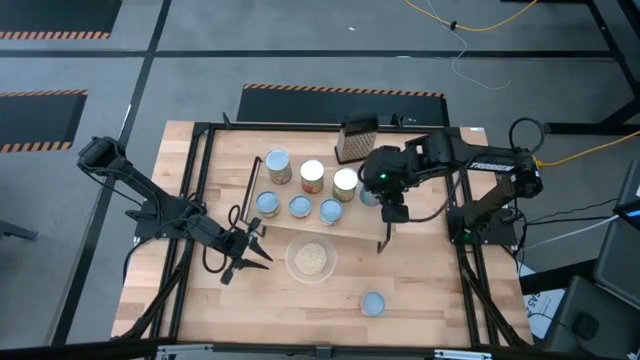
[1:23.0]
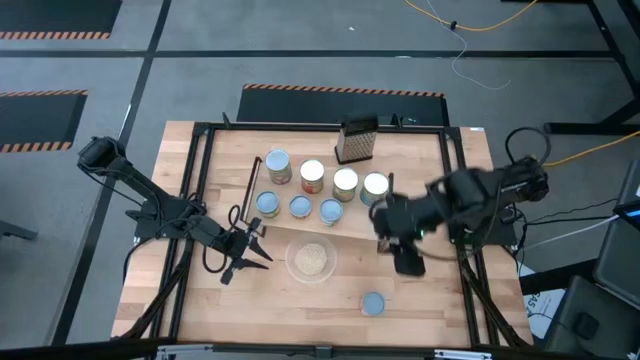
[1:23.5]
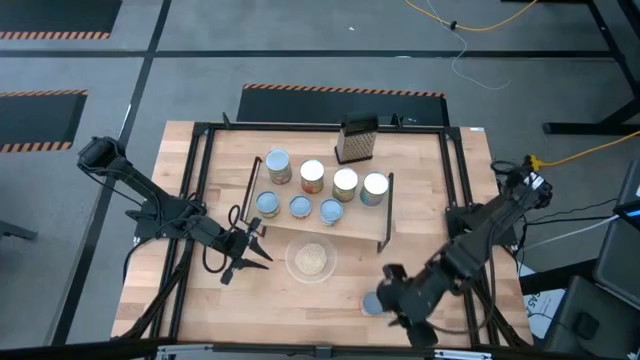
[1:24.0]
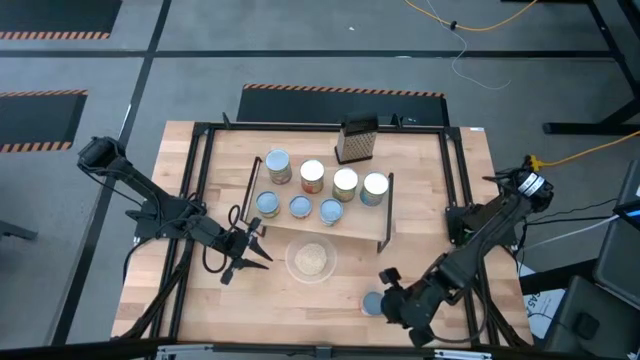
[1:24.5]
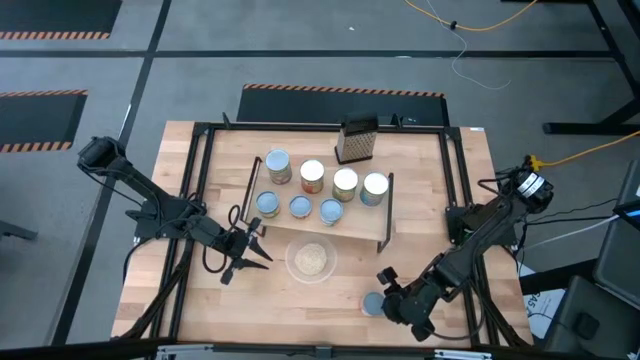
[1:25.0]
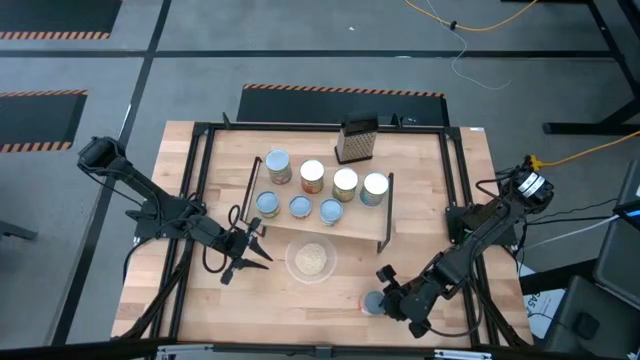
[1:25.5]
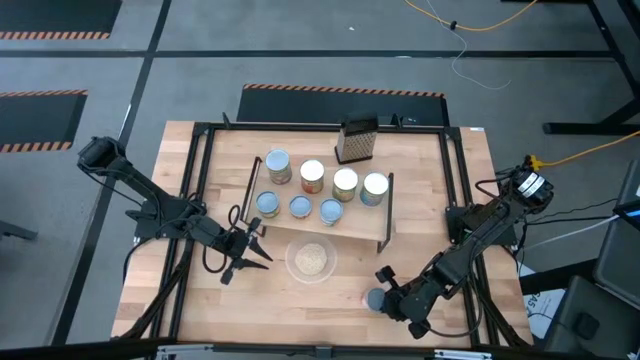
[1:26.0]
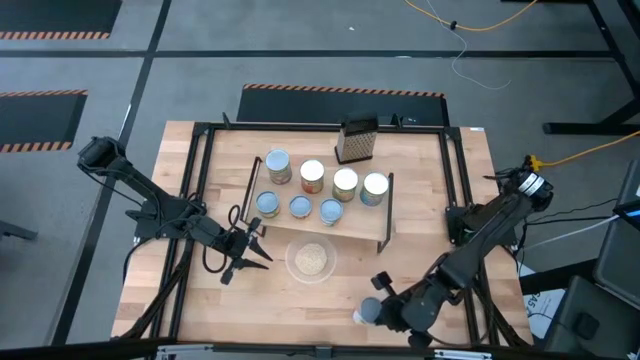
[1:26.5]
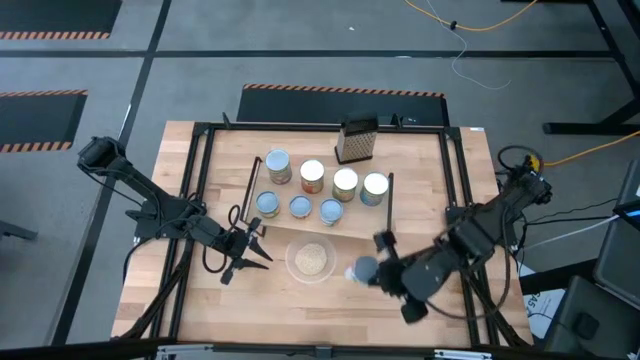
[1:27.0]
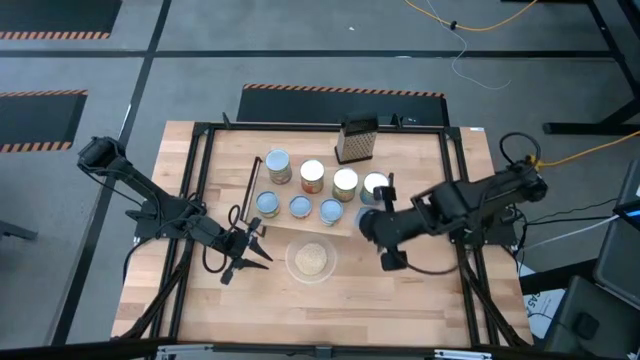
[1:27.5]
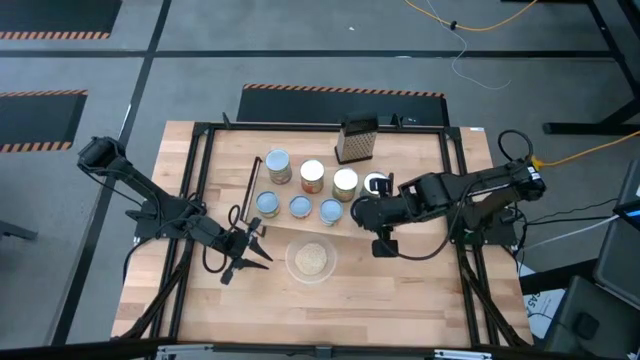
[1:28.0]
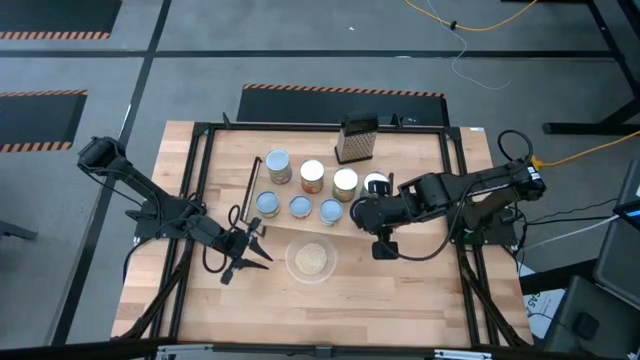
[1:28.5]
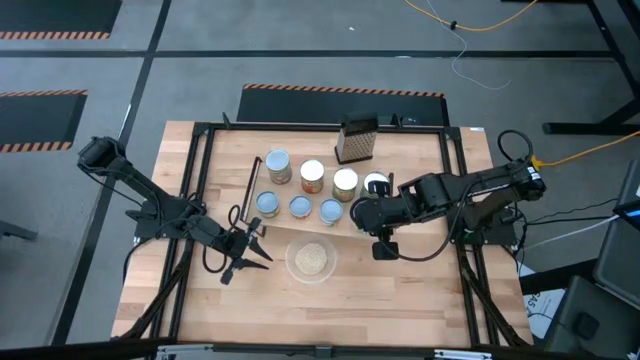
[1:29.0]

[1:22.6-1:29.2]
Task: Pick and place cans onto a shelf
Put the canned fruits on the shelf

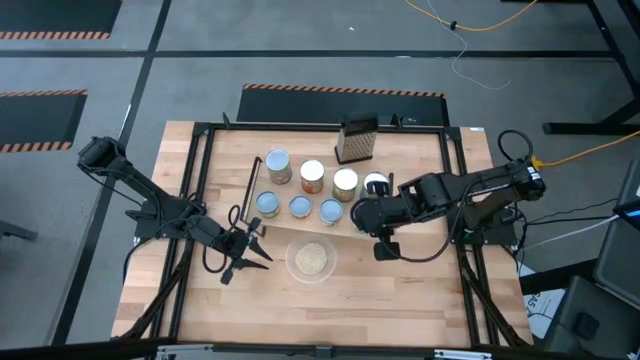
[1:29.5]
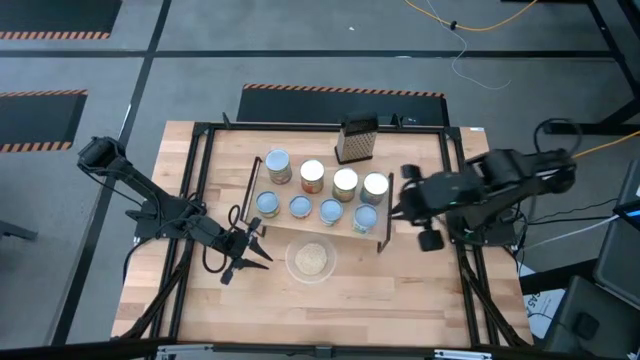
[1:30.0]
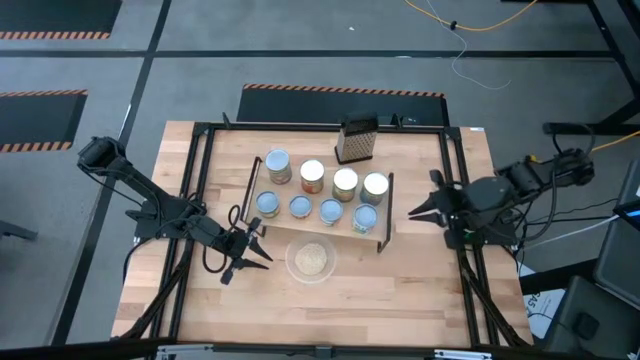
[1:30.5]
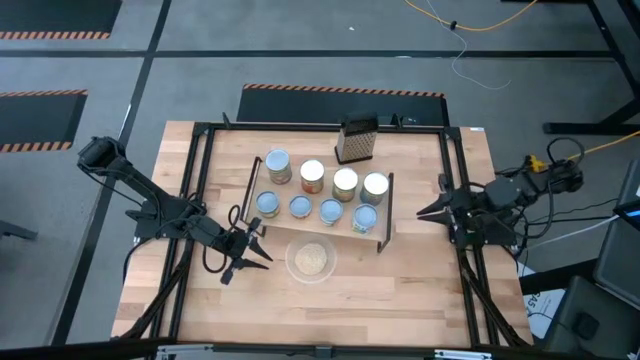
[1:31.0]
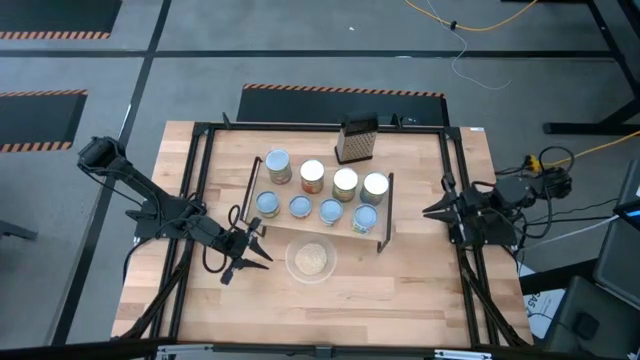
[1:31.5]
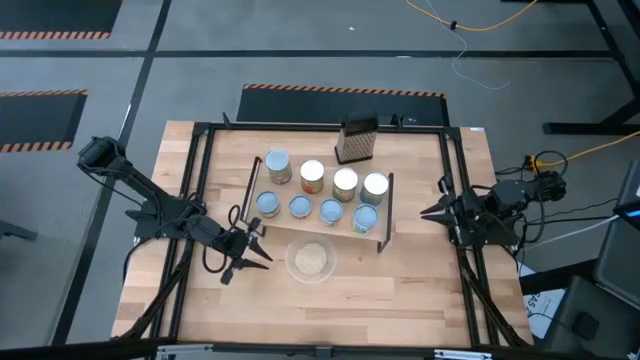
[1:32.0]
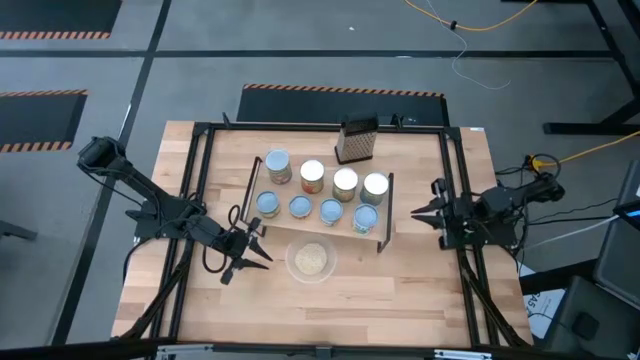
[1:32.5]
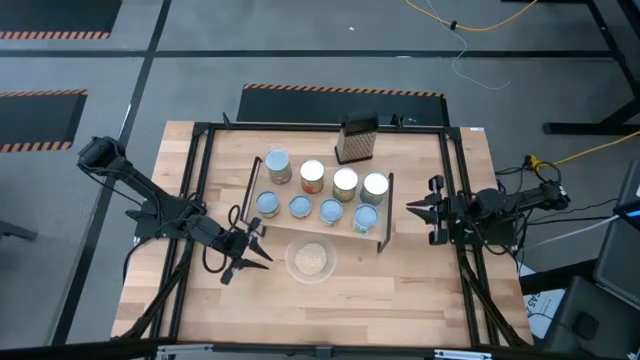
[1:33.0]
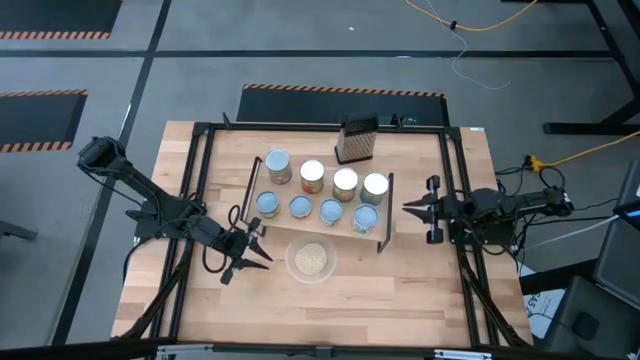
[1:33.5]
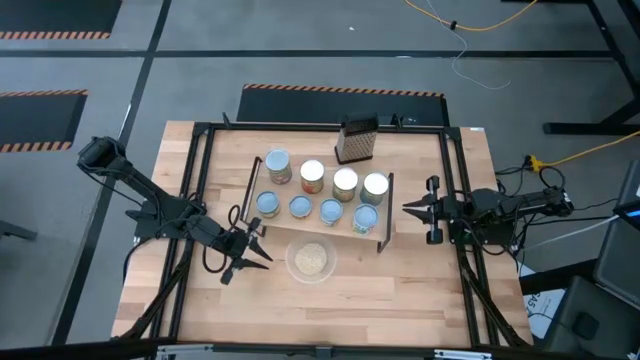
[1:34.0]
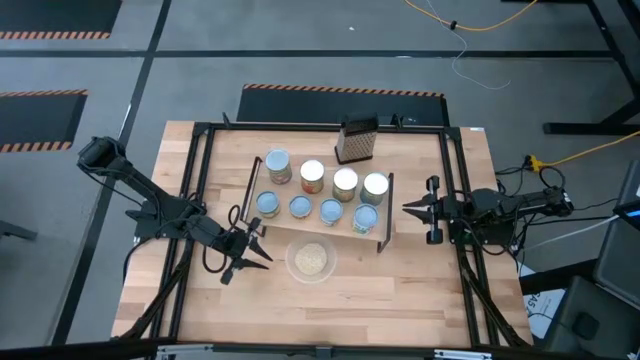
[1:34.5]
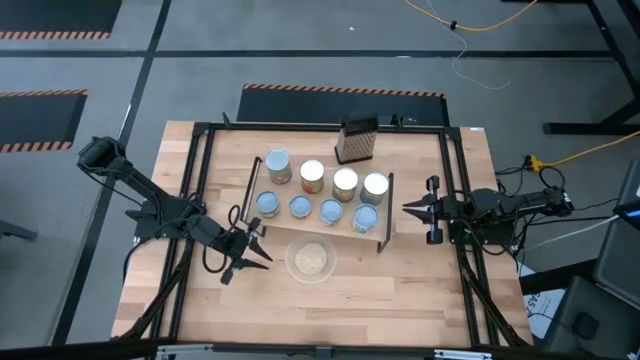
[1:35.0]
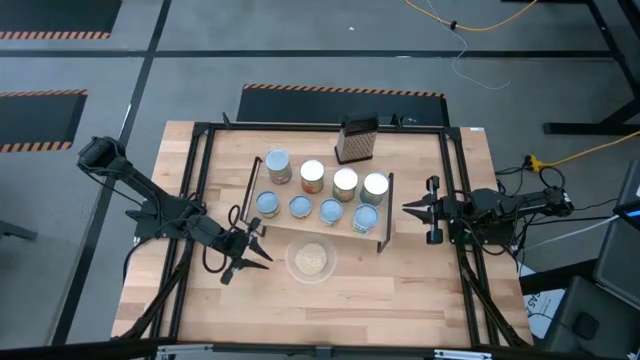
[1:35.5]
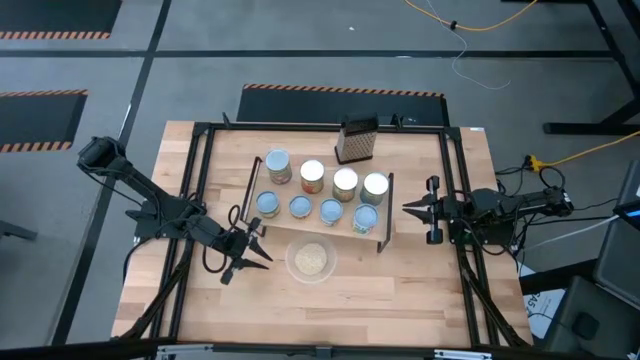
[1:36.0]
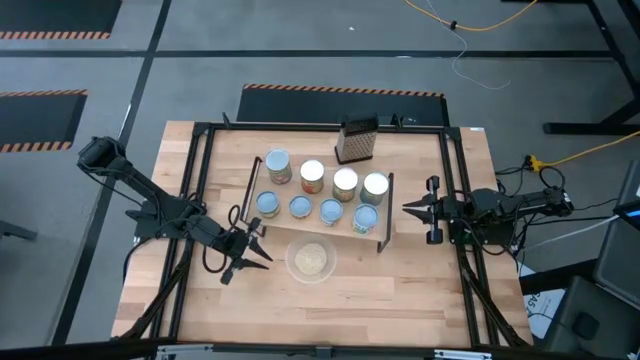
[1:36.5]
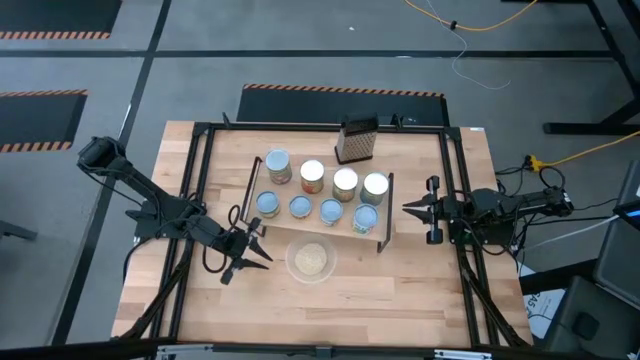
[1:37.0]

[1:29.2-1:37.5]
Return to Home Position

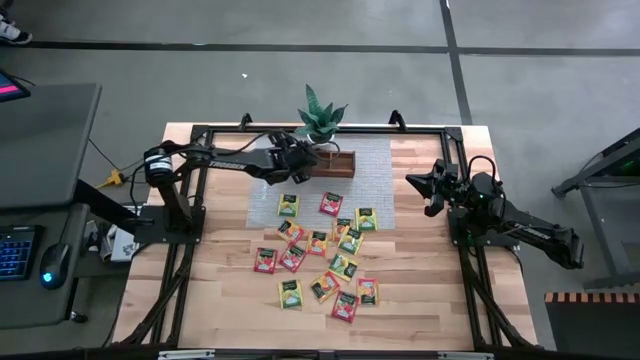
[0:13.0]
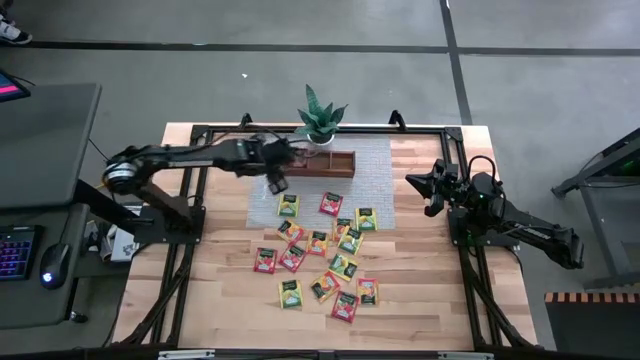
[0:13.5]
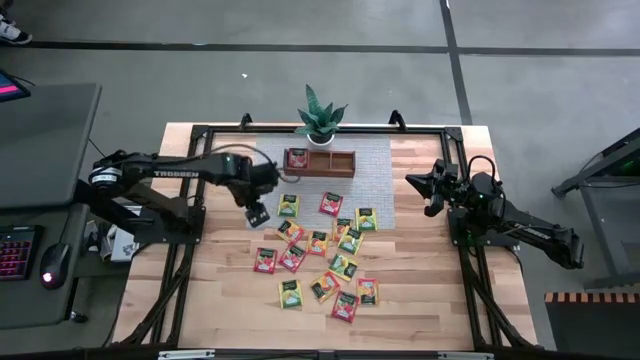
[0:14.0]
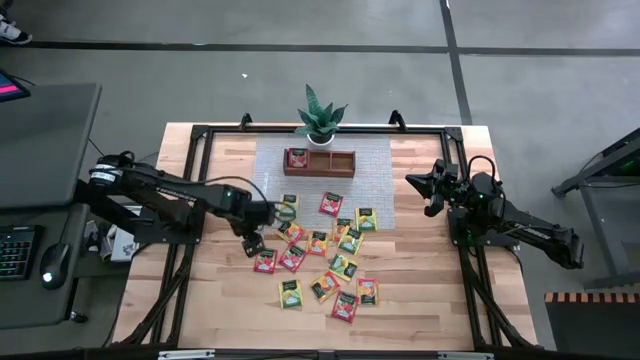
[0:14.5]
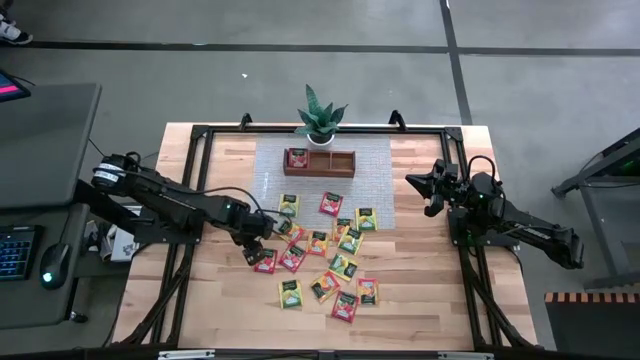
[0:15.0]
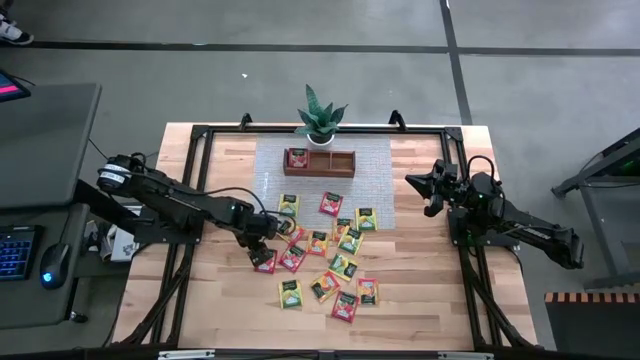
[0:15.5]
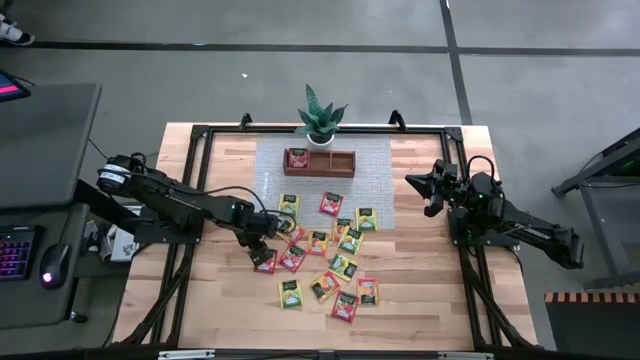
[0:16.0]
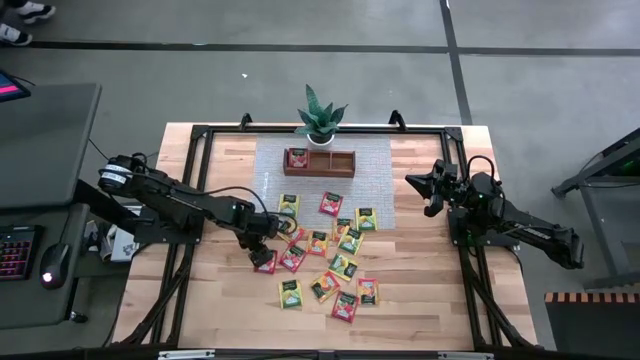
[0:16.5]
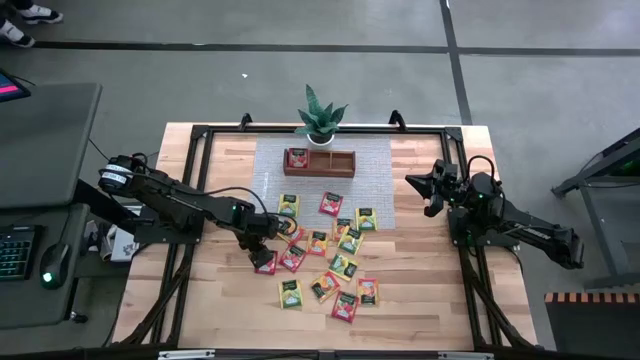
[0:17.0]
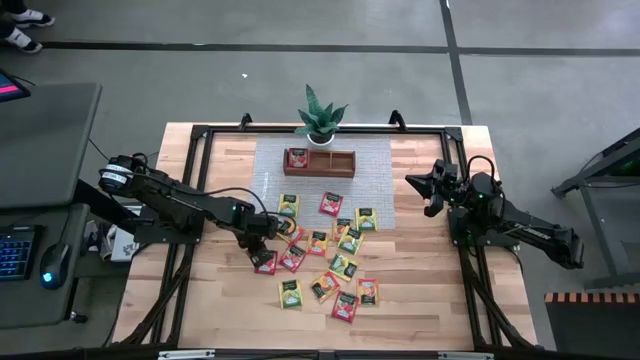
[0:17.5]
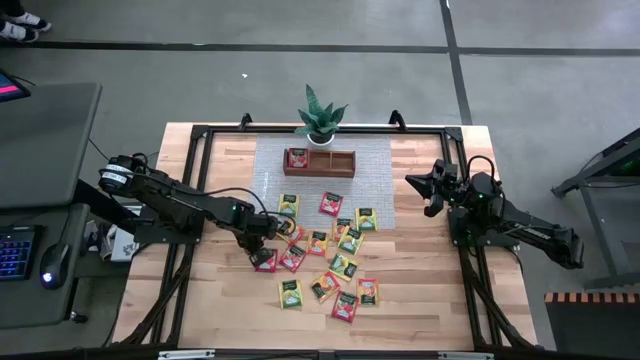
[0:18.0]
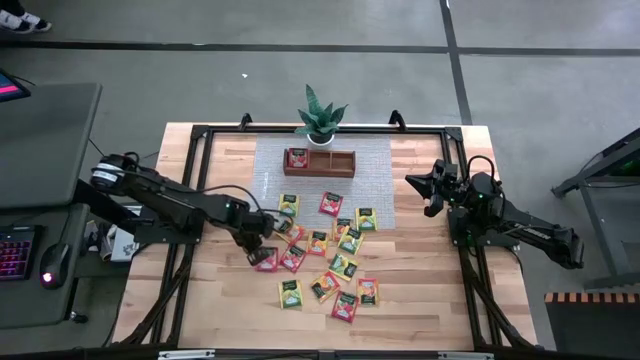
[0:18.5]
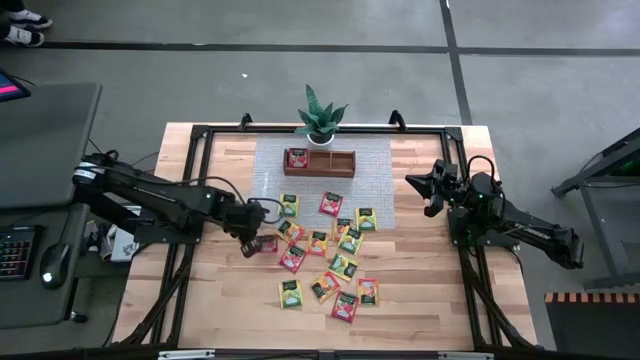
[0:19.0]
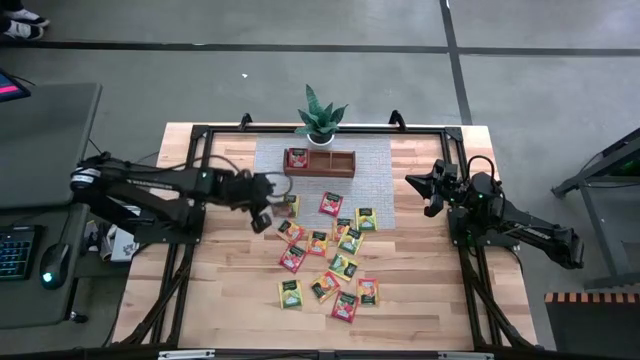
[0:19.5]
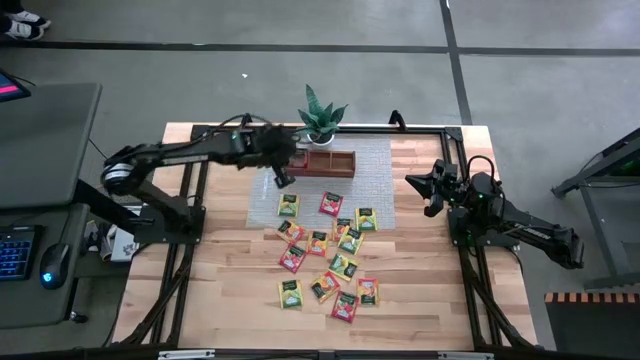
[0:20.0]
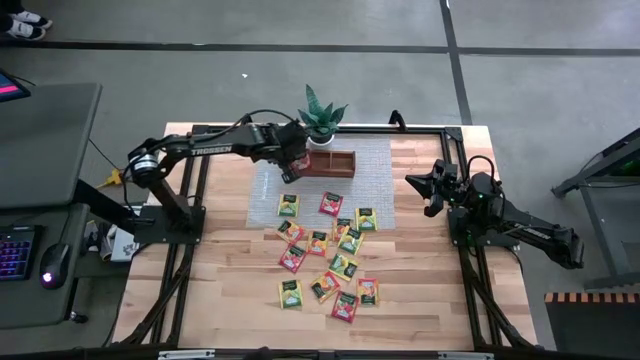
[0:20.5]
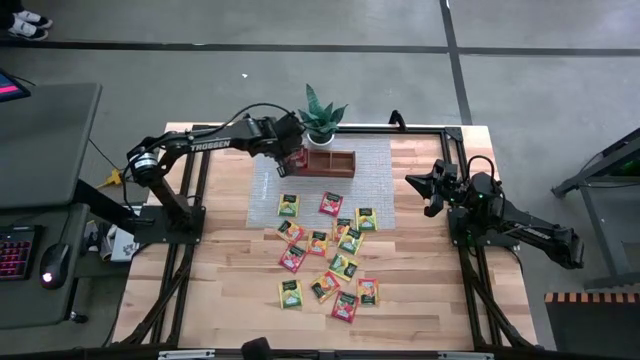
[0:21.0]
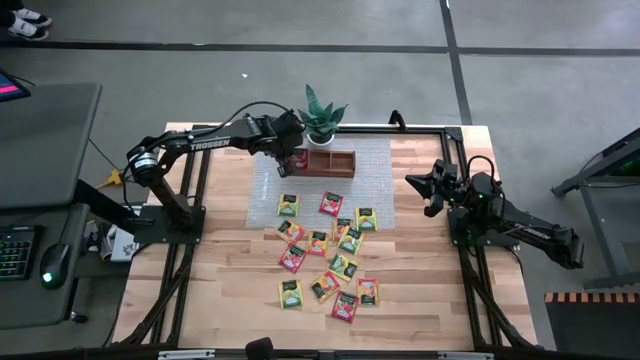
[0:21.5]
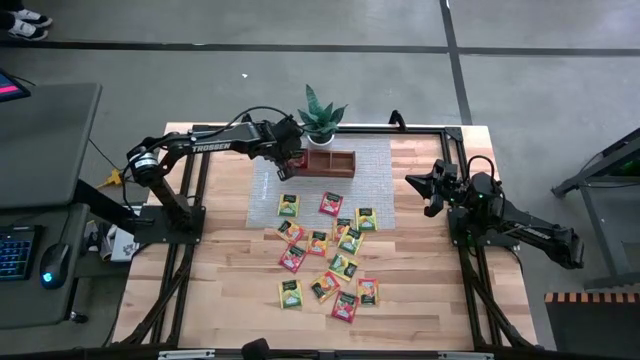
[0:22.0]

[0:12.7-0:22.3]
Task: Pick & Place Tea
Put the red tea bag into the left section of the wooden organizer
